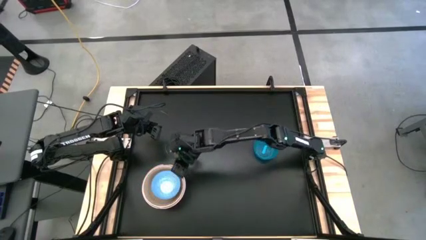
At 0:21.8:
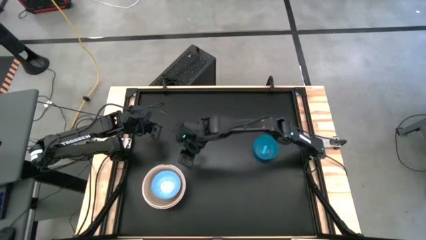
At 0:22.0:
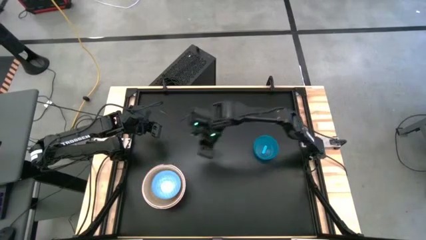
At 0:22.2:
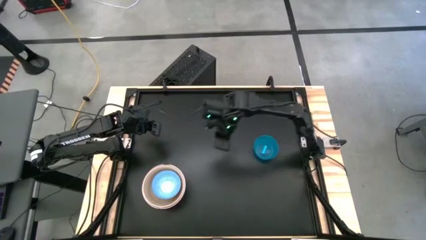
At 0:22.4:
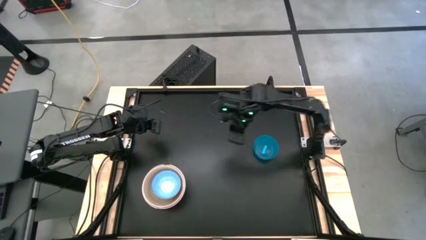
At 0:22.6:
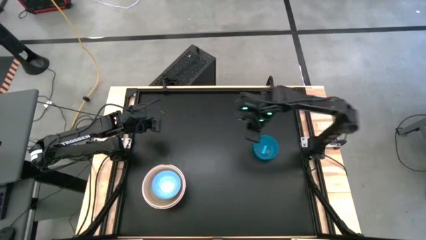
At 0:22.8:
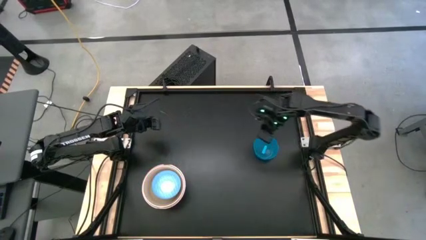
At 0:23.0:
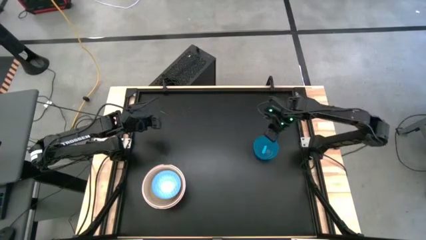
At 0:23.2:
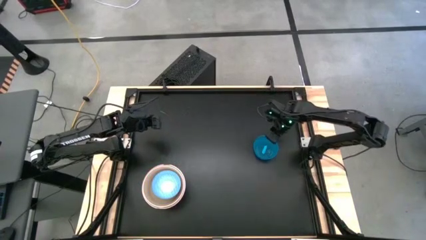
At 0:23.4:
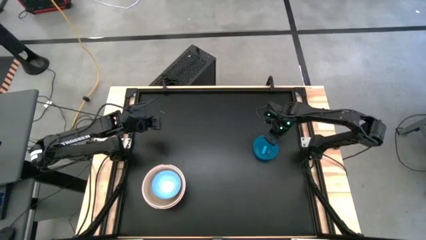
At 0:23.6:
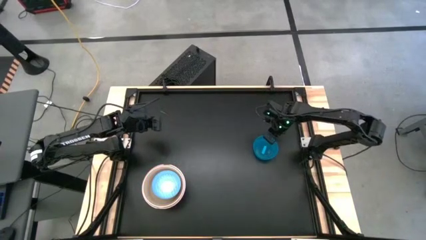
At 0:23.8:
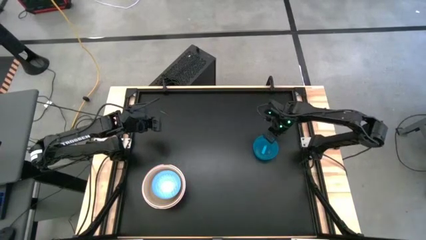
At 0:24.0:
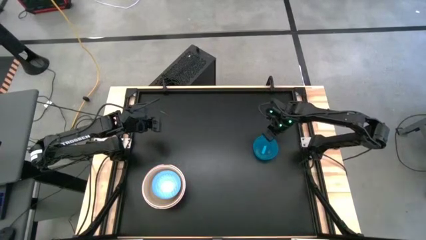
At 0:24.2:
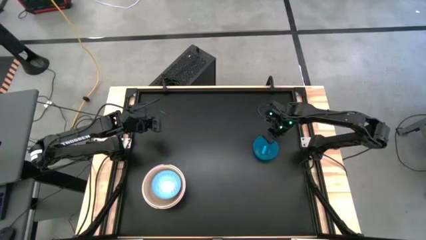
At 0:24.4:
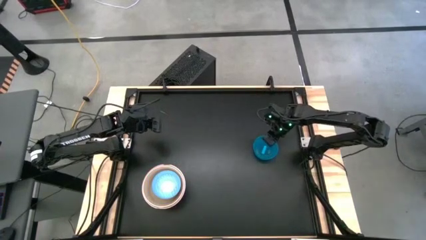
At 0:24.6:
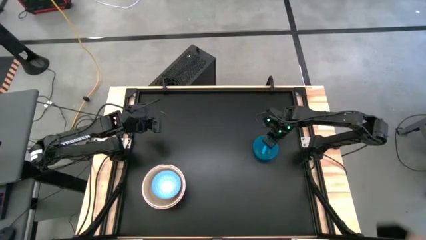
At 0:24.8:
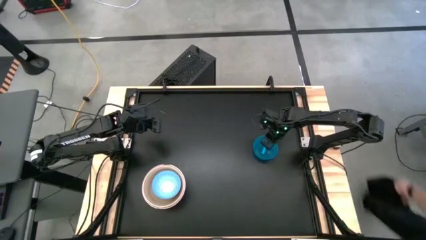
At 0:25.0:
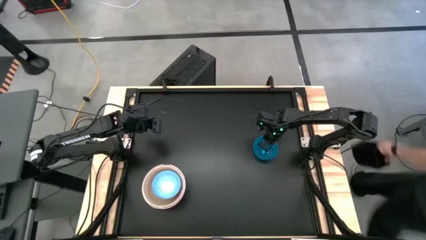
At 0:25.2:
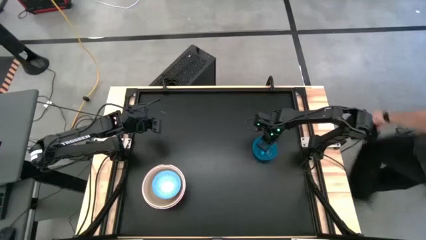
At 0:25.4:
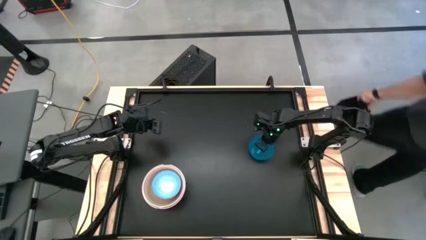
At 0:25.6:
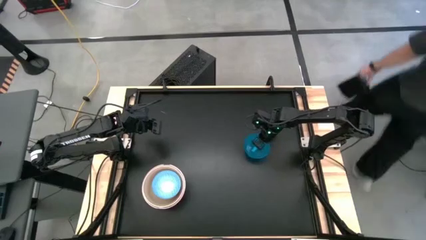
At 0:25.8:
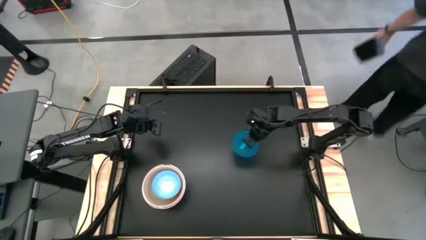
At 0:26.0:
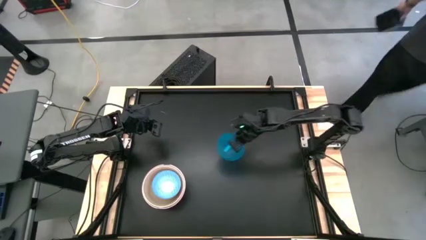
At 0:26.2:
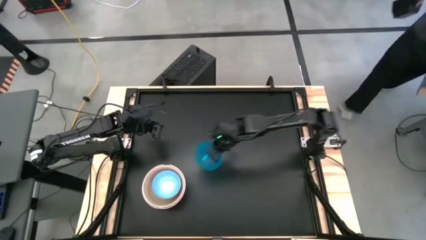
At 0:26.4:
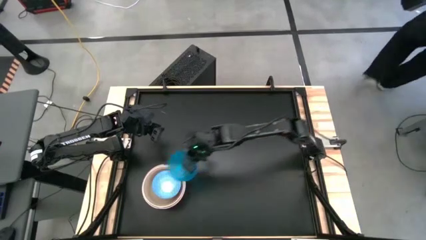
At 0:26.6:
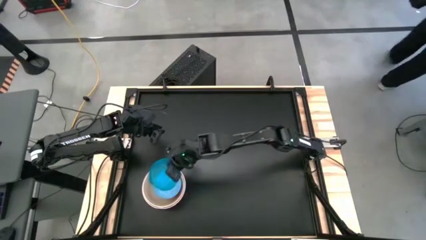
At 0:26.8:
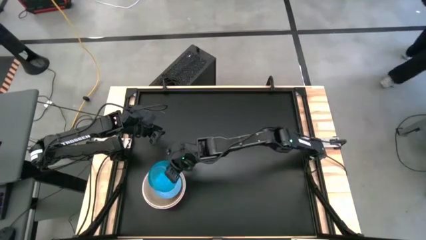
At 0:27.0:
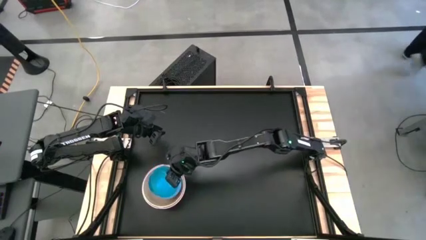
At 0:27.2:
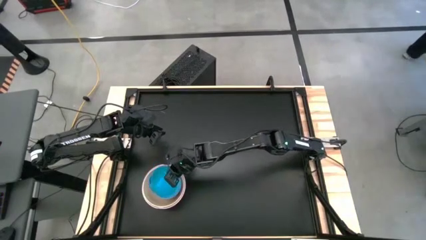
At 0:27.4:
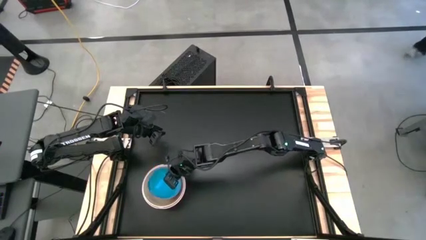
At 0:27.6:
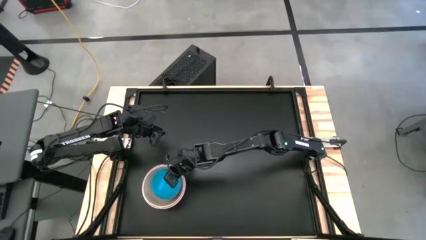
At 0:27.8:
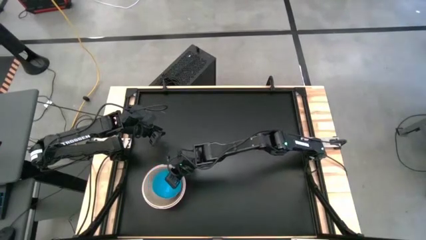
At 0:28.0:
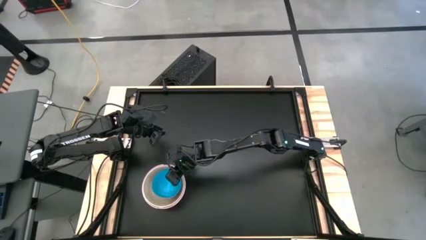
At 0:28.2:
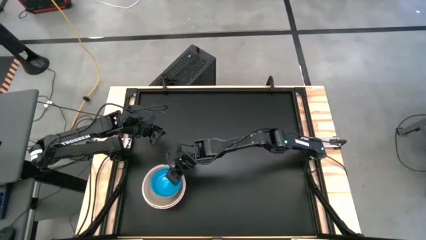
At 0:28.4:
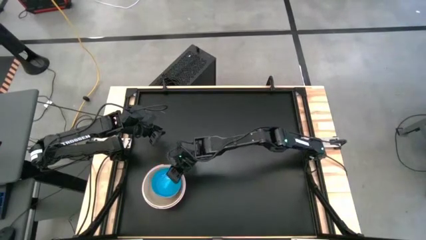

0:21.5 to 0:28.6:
Stack the blue bowl on top of the blue patterned bowl

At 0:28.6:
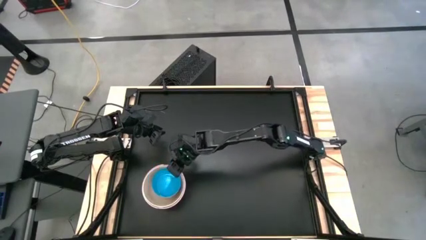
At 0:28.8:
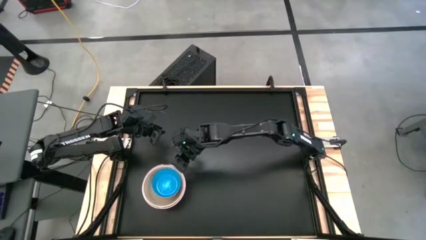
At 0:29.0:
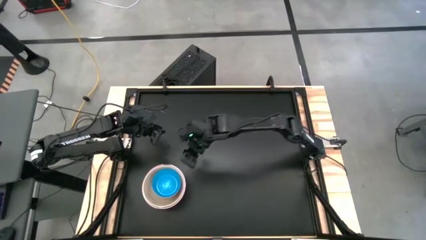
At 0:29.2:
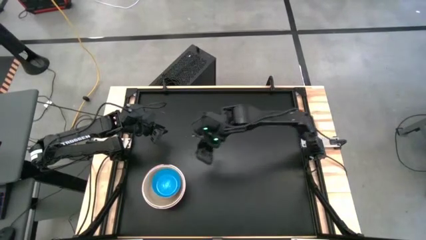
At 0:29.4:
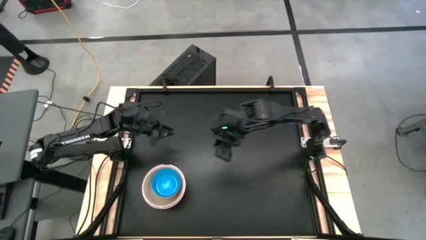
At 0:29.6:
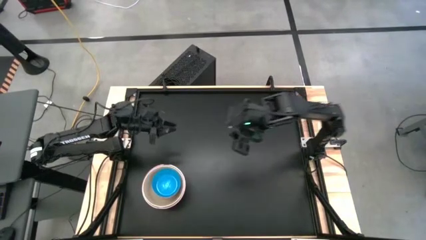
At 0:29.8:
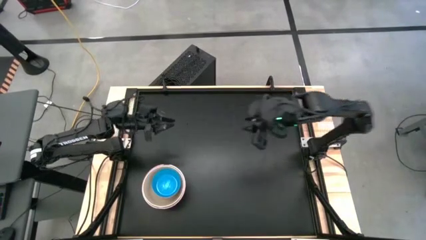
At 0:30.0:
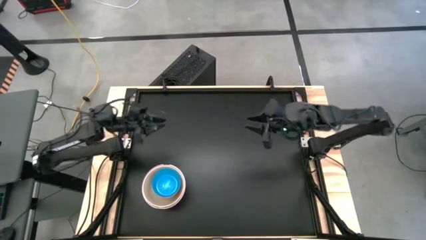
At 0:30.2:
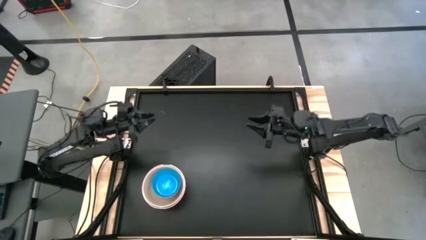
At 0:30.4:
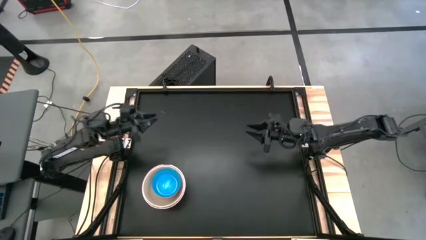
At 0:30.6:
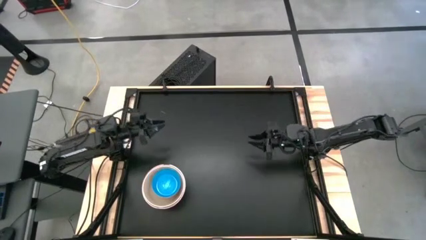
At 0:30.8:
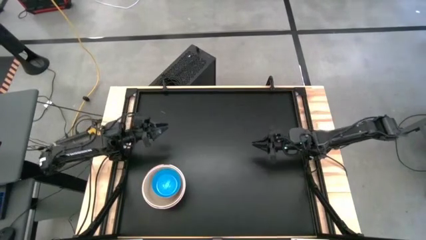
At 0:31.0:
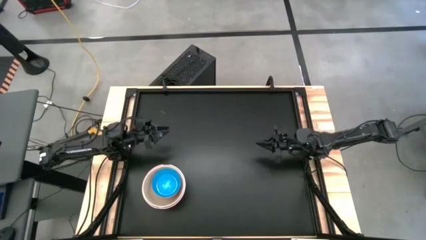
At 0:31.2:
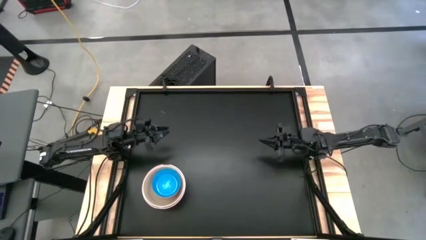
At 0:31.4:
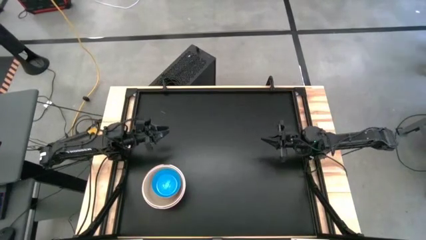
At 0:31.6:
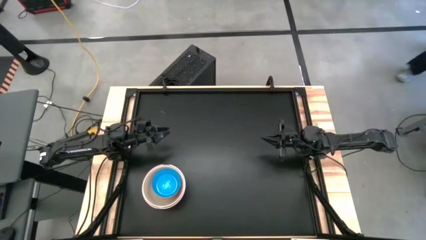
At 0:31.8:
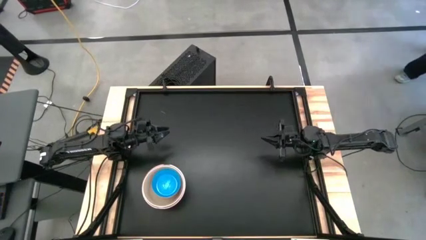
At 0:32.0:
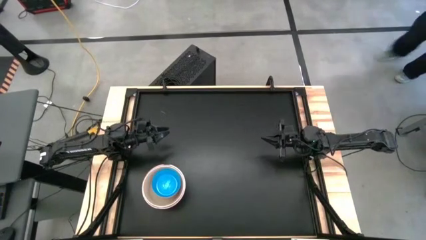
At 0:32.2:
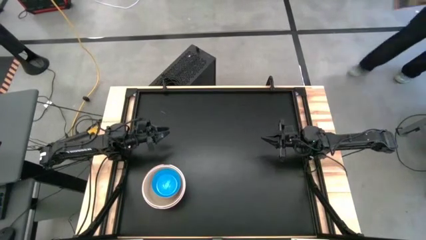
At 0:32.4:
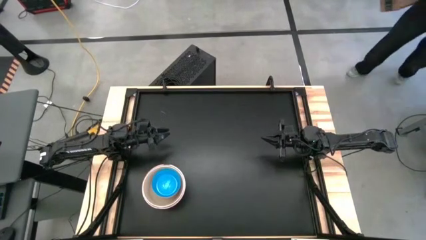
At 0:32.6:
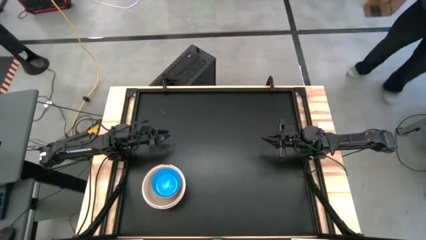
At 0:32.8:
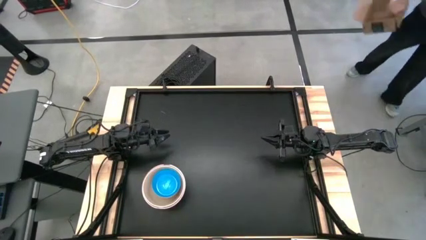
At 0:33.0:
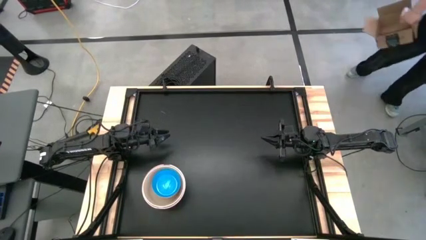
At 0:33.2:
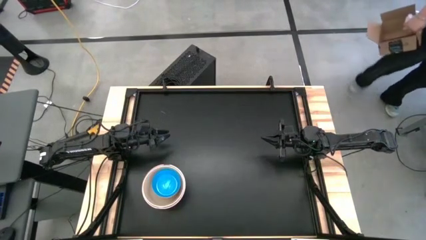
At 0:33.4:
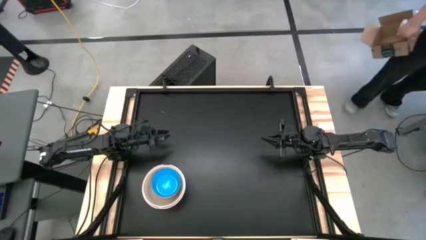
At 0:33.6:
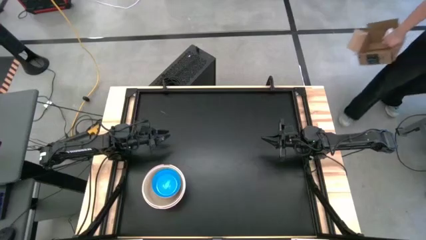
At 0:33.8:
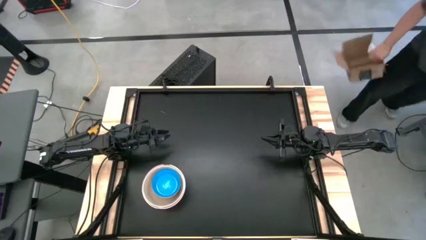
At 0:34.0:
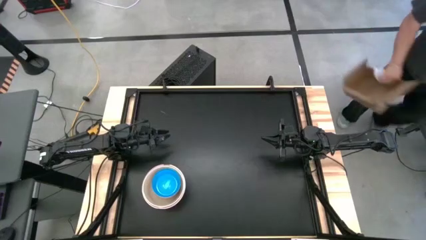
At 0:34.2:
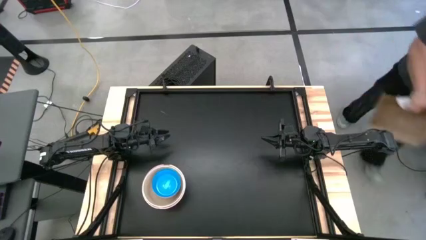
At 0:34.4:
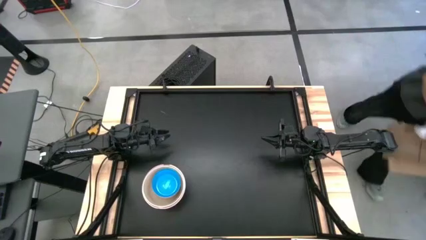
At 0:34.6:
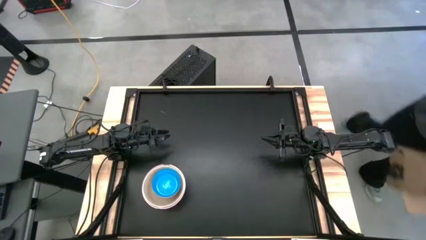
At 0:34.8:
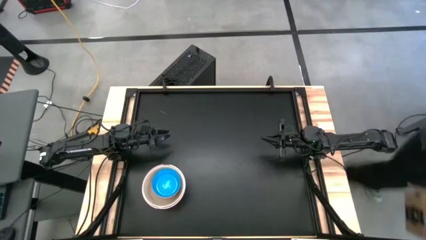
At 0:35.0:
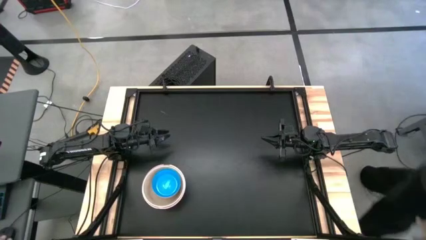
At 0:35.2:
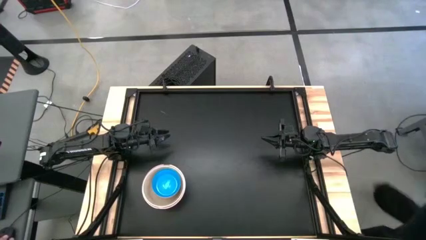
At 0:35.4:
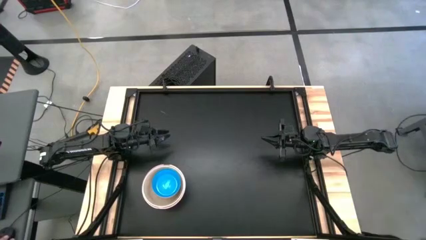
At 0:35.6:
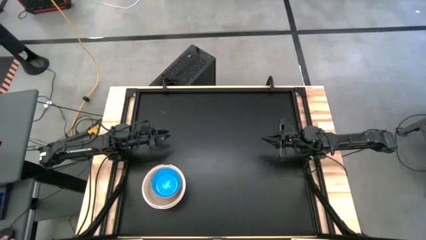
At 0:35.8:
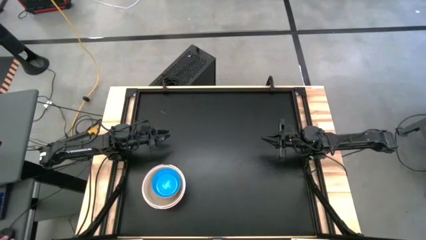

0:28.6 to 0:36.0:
Return to Home Position
